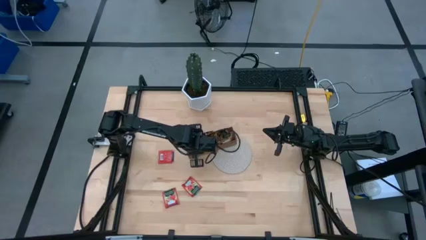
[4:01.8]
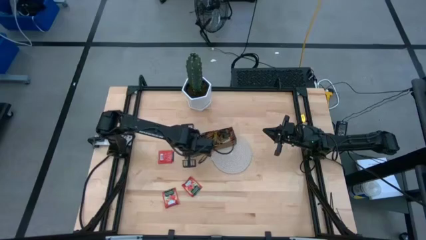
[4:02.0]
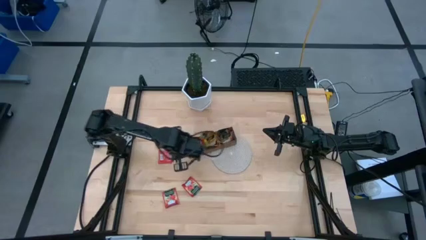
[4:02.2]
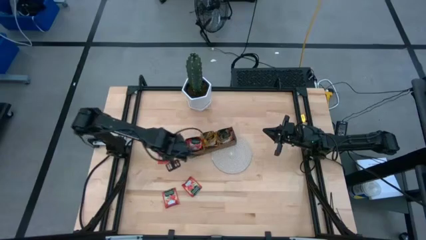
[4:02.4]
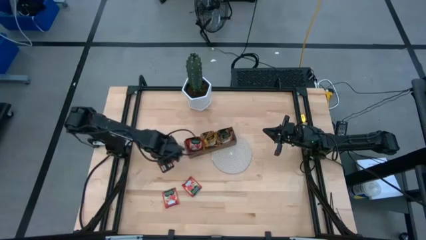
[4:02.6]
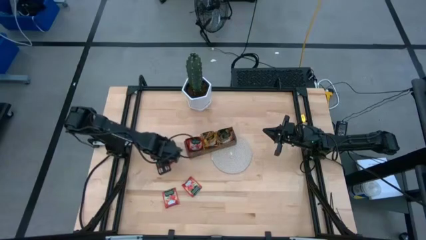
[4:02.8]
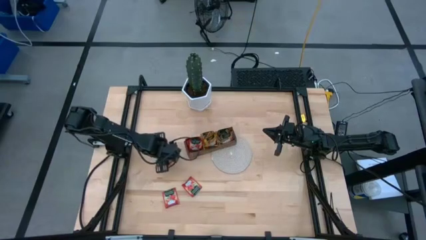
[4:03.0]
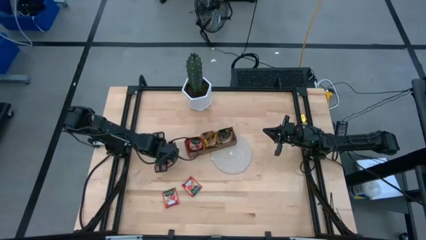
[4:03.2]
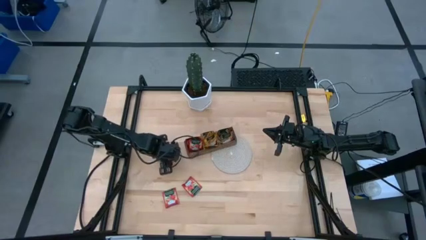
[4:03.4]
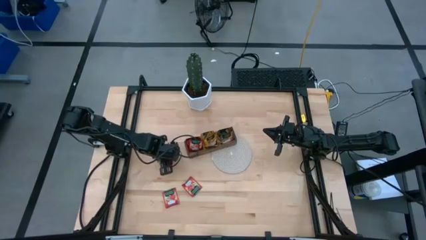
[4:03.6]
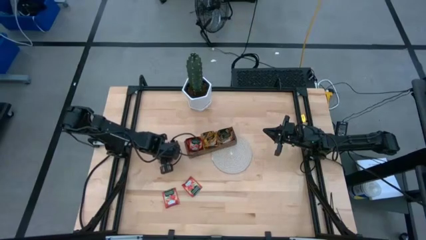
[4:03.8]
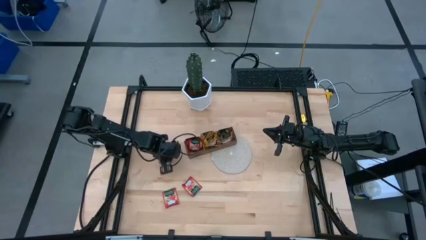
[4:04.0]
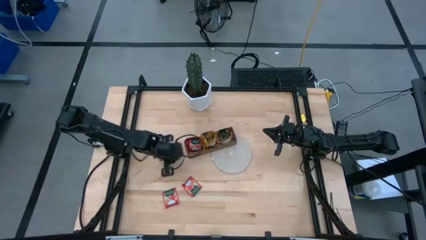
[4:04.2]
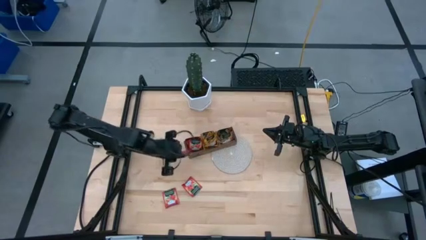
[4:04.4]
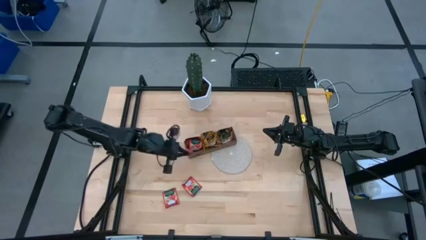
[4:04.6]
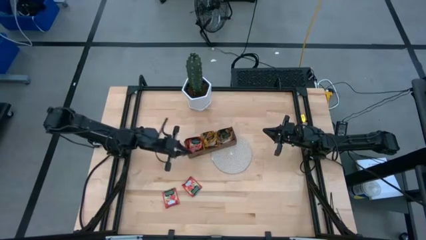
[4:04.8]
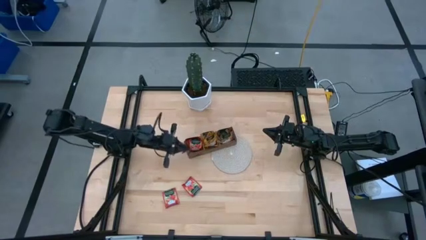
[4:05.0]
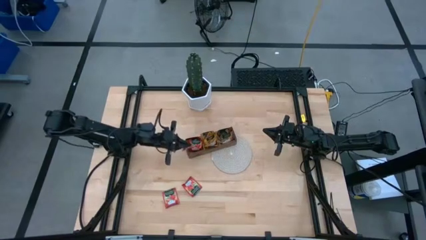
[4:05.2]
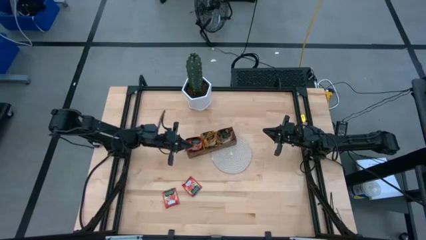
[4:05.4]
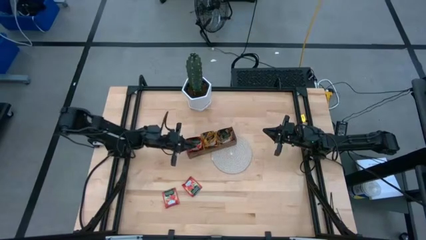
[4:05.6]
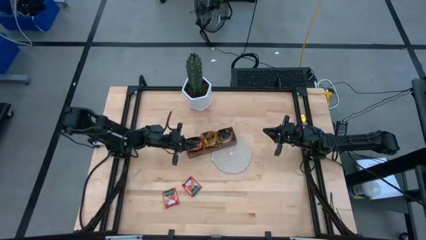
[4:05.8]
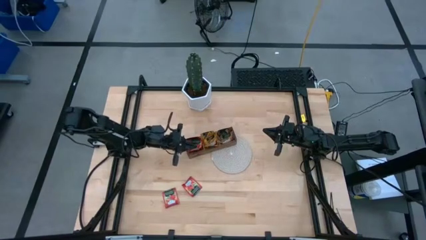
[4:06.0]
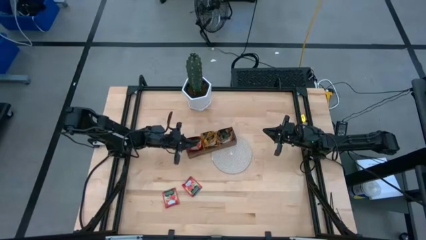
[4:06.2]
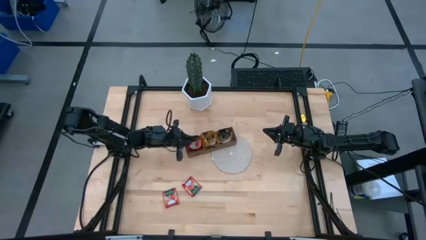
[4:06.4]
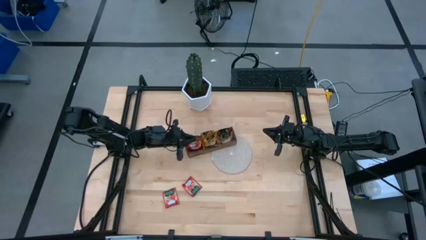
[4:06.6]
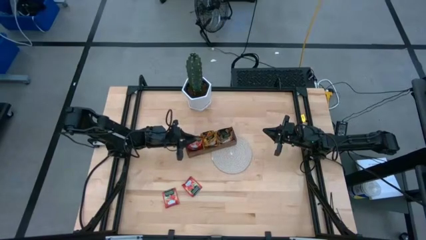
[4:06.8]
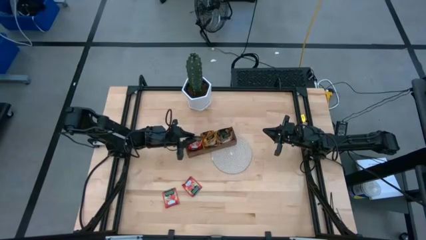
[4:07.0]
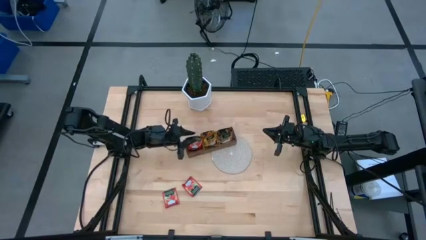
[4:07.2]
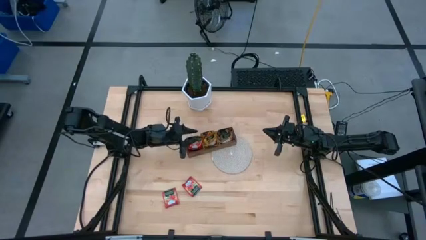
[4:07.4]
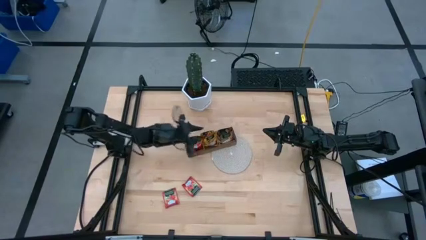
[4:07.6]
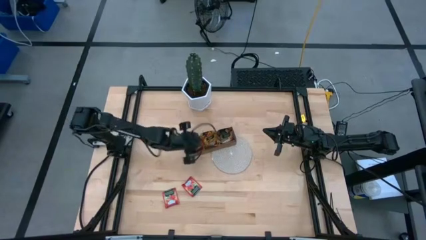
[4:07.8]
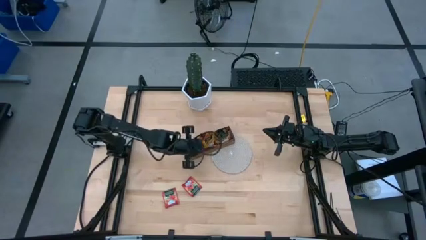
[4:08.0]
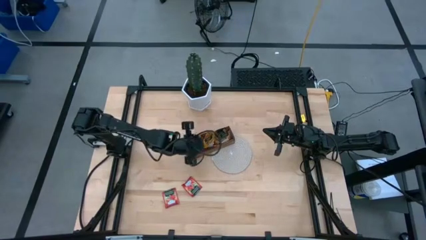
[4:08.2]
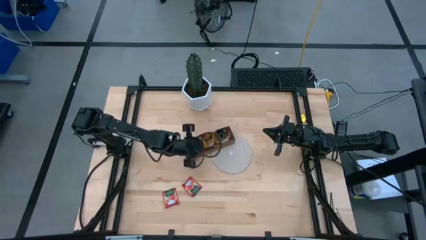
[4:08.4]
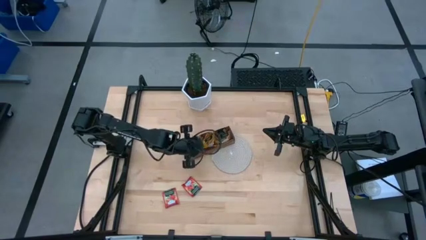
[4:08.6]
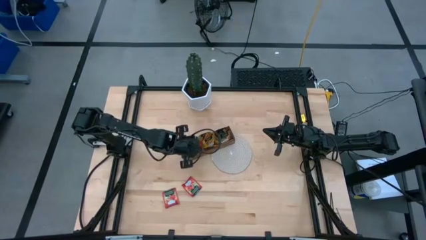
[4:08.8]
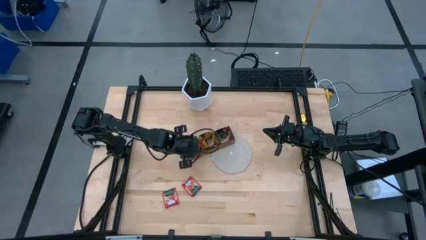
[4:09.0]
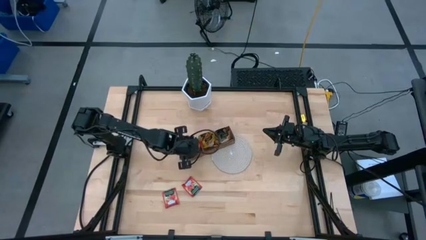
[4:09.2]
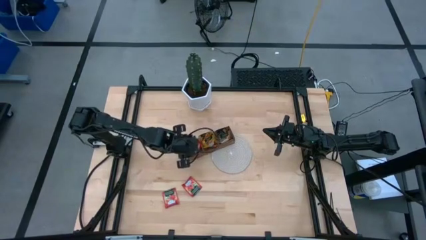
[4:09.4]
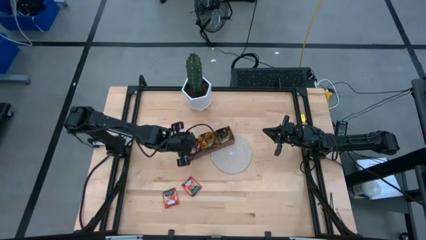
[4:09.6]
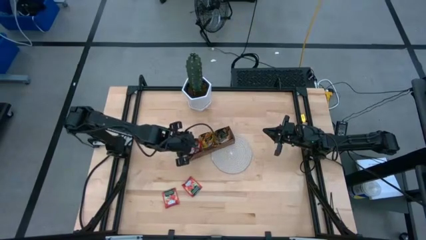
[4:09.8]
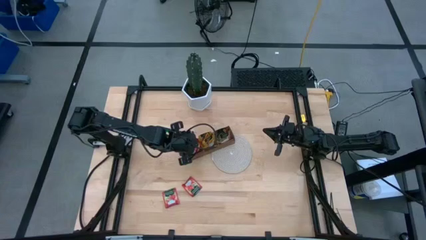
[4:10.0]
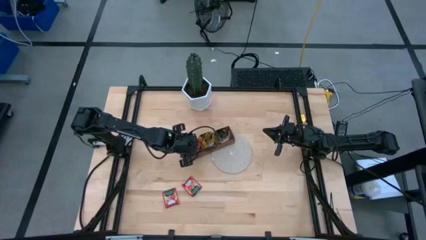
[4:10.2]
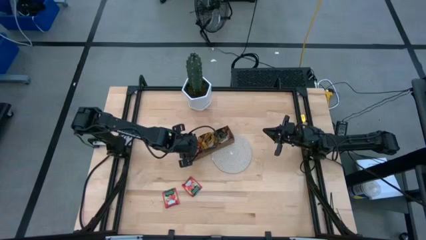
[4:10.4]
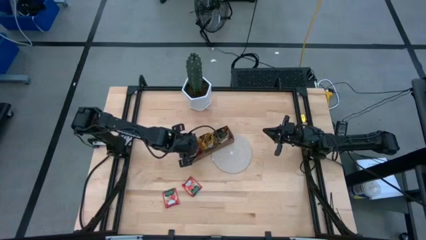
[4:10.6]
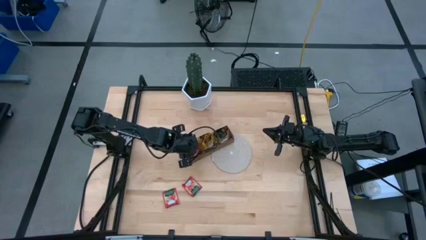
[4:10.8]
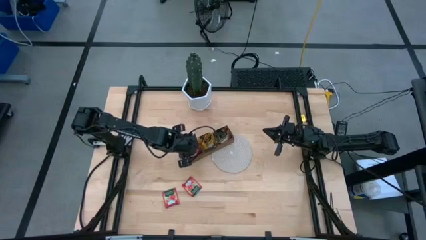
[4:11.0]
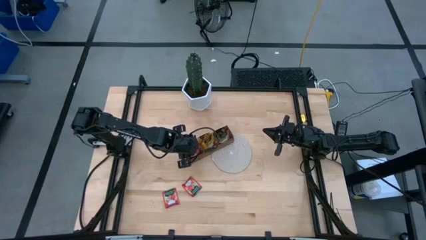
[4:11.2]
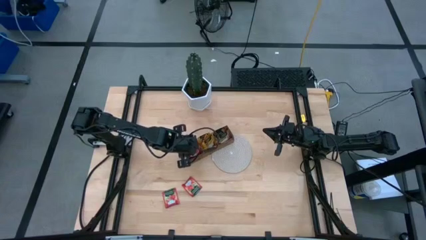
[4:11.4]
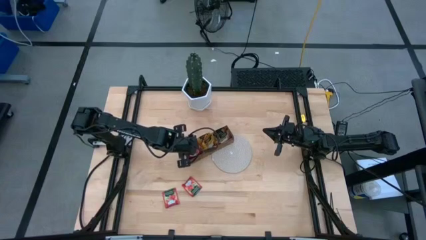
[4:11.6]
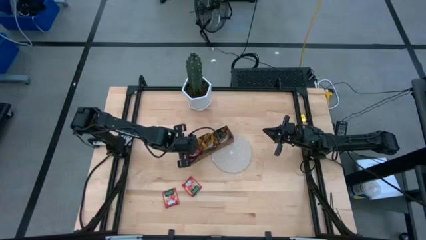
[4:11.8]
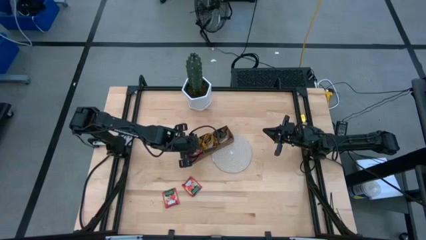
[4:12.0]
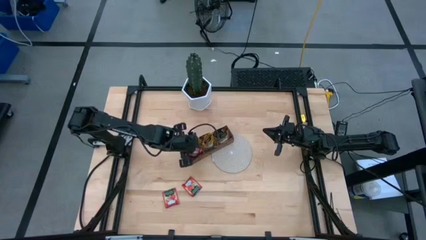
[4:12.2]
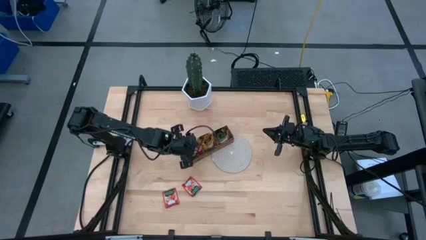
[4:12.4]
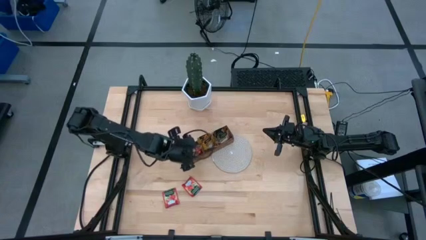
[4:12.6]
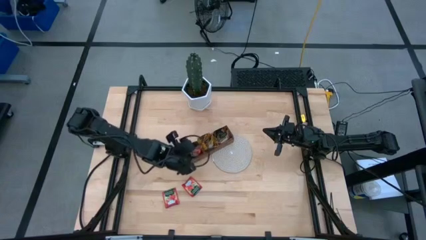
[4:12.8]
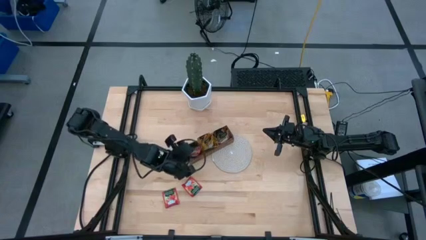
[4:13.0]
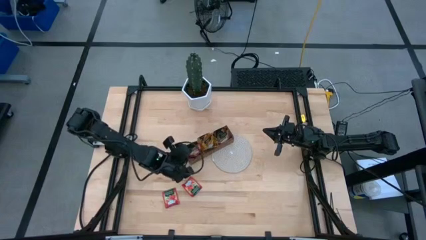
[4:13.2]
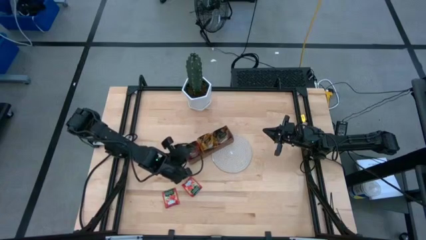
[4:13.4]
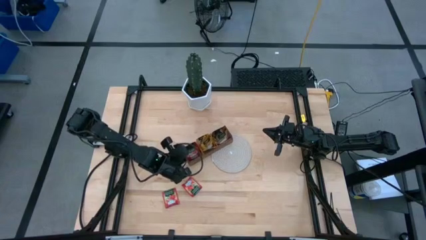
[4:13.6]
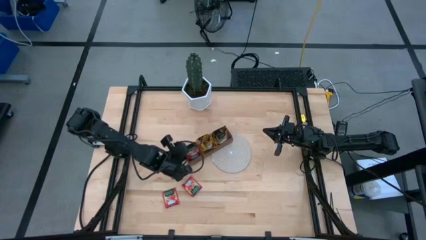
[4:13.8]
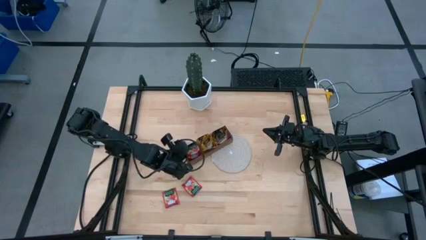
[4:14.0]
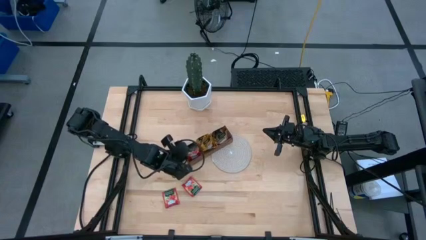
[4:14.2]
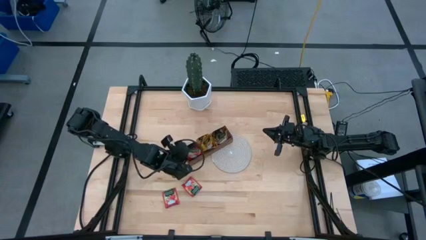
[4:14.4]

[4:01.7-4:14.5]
Task: Pick & Place Tea
Put the red tea bag into the left section of the wooden organizer

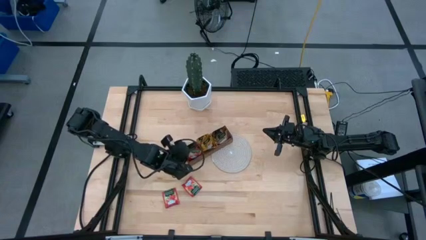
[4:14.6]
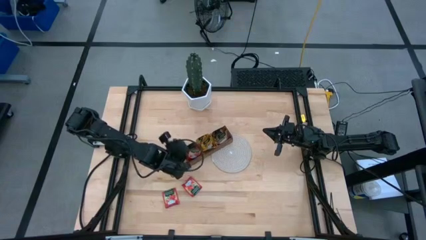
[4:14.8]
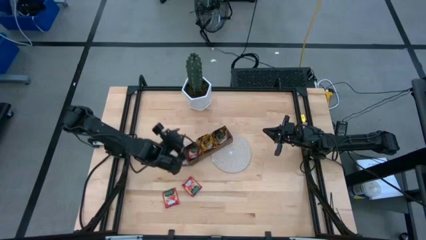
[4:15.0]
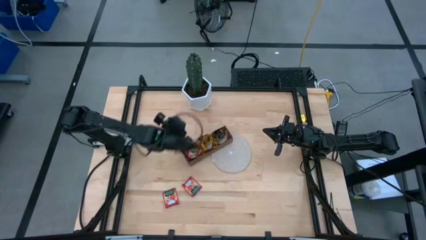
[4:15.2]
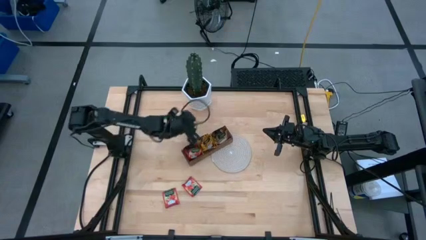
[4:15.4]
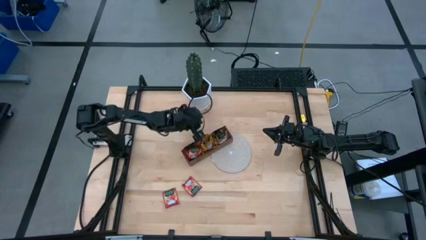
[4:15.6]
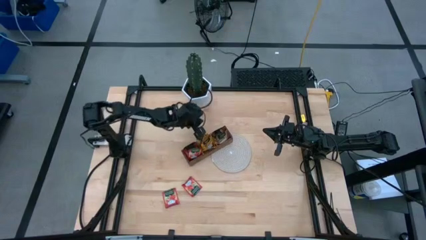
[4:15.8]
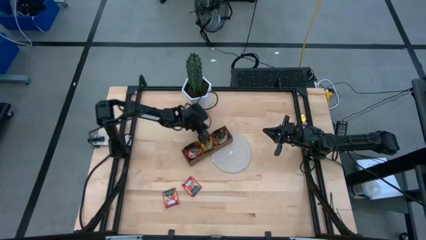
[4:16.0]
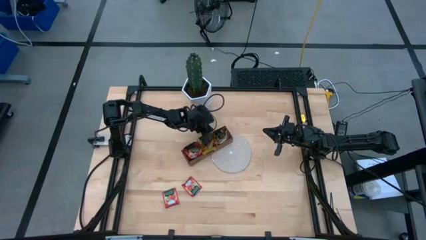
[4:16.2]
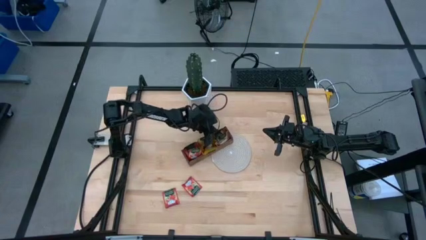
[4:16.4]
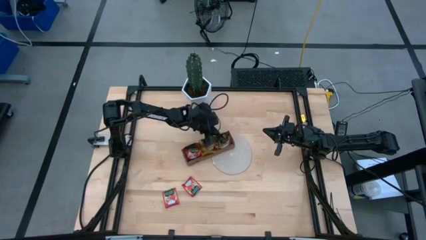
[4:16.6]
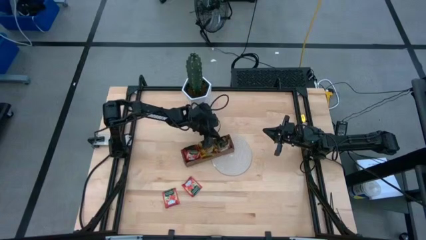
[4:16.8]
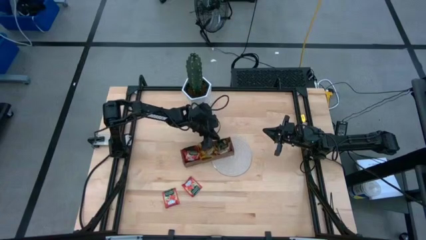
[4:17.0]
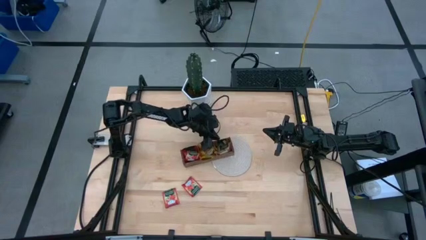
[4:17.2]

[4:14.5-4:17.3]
Adjust the wooden organizer

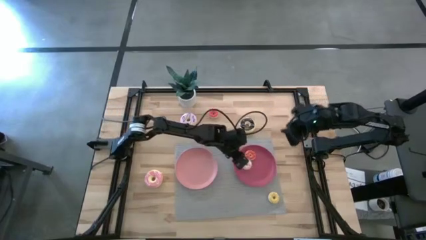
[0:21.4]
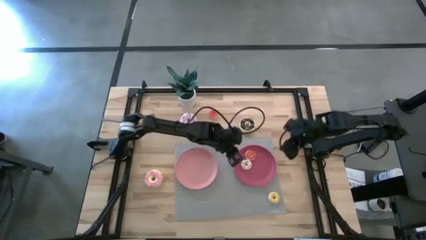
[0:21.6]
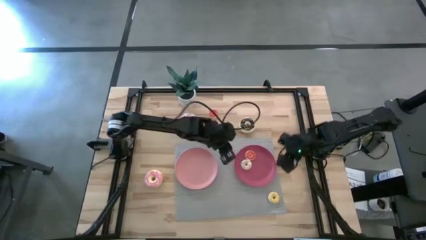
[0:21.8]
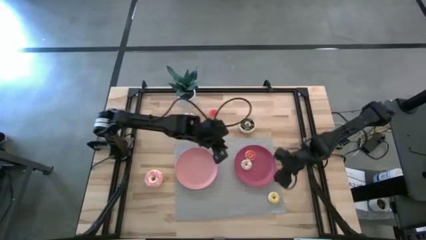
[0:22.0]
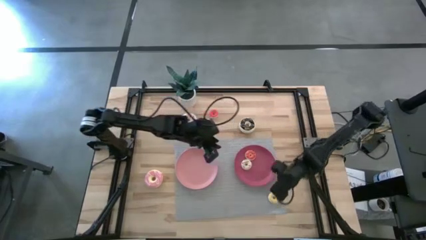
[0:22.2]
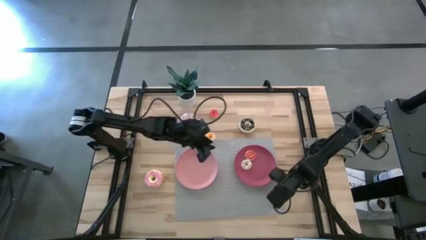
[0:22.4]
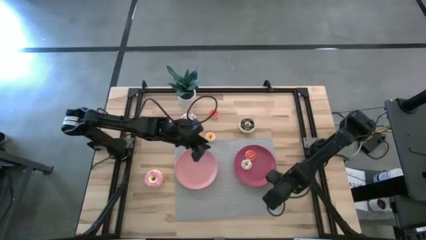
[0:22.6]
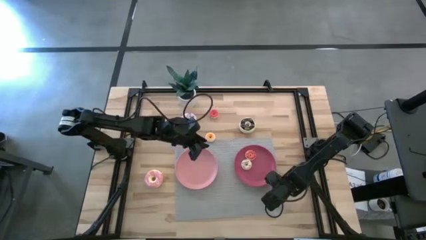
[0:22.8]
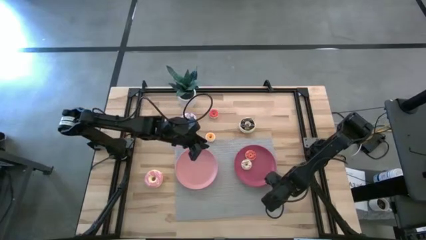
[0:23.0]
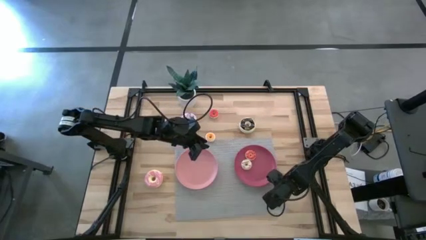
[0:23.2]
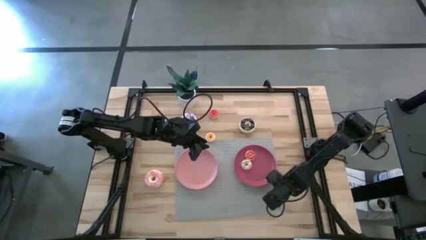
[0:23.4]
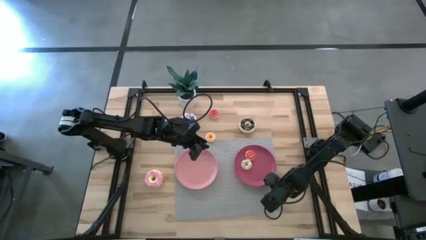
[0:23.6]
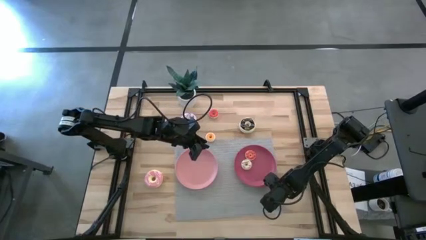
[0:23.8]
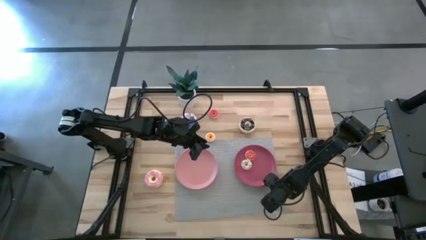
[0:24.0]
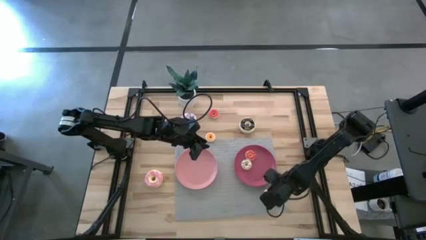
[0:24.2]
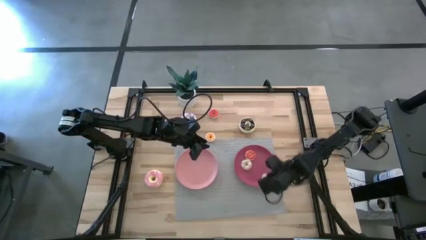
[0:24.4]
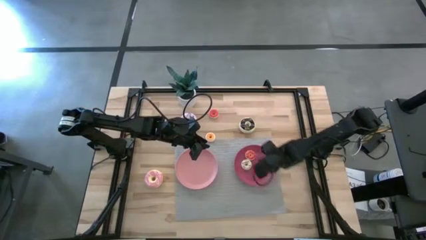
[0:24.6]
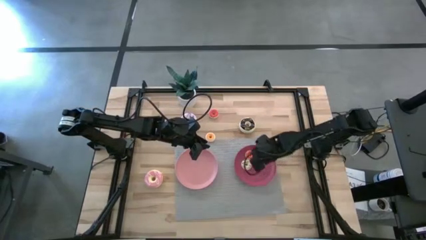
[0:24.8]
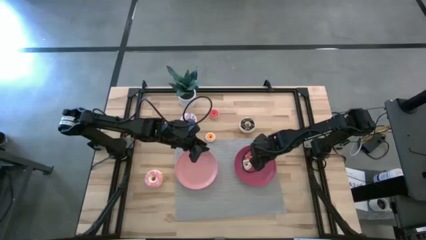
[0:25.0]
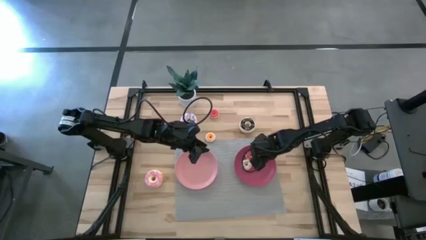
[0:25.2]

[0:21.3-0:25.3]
Task: Pick & Place donuts
Put the small yellow donut on the dark pink plate
